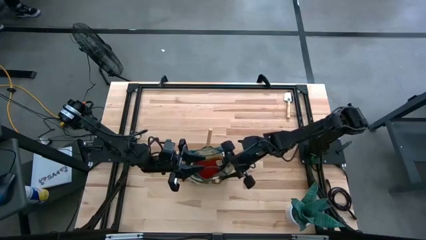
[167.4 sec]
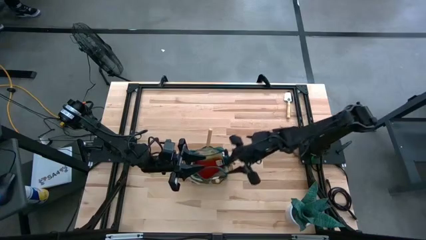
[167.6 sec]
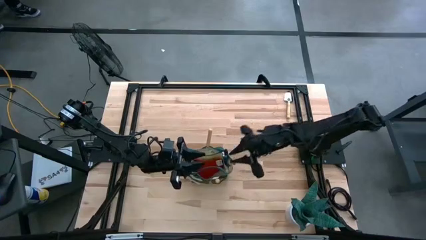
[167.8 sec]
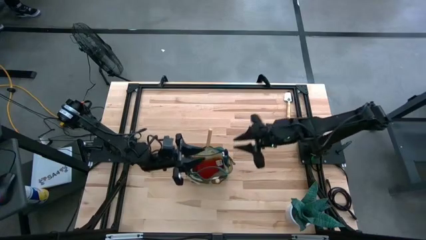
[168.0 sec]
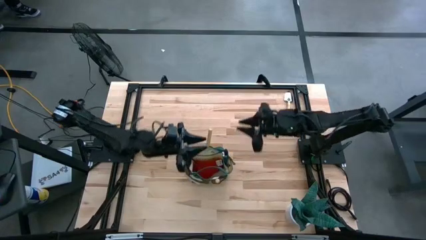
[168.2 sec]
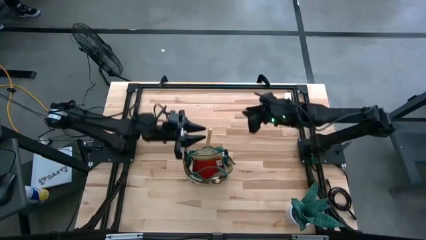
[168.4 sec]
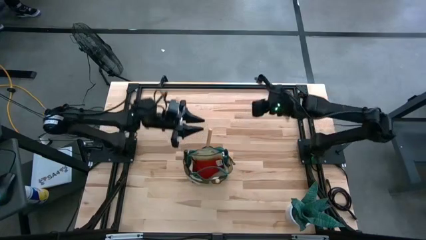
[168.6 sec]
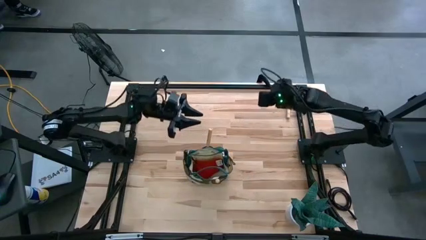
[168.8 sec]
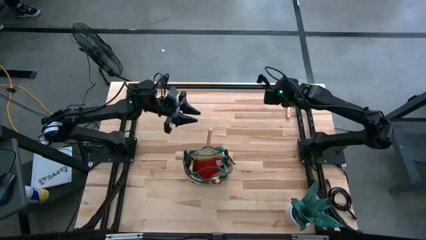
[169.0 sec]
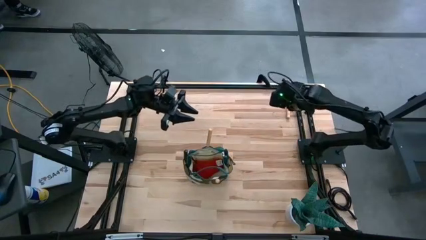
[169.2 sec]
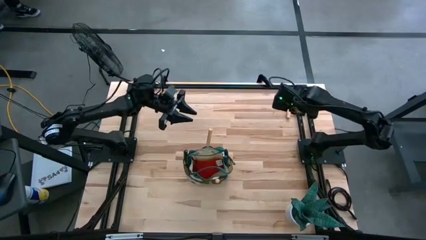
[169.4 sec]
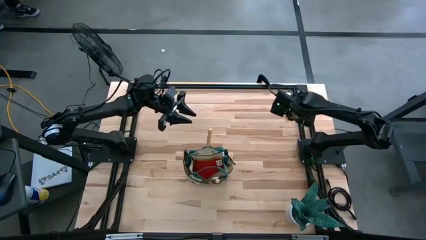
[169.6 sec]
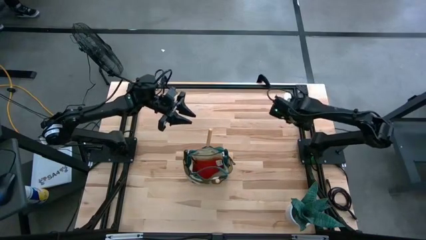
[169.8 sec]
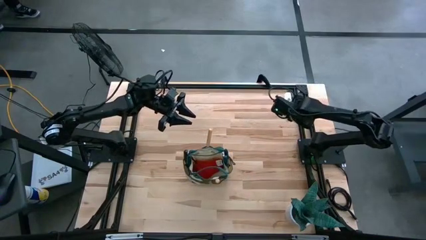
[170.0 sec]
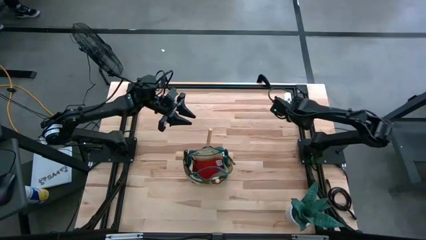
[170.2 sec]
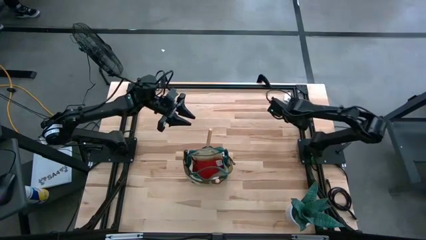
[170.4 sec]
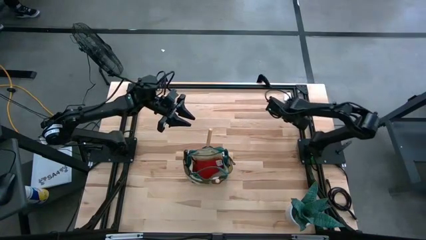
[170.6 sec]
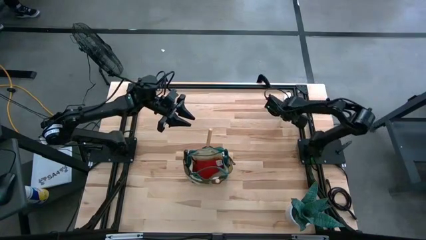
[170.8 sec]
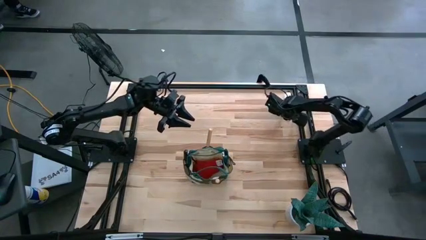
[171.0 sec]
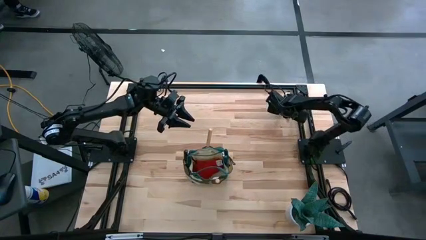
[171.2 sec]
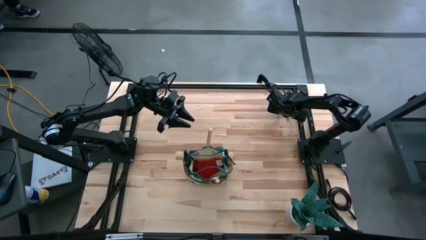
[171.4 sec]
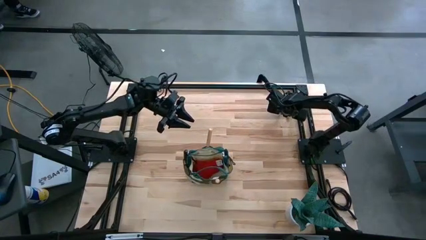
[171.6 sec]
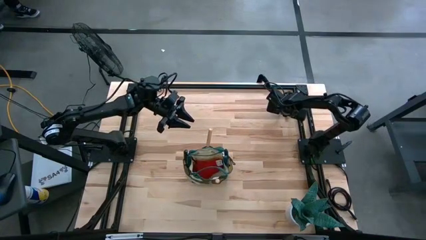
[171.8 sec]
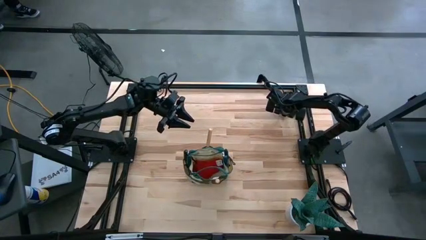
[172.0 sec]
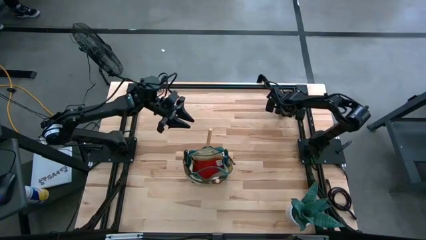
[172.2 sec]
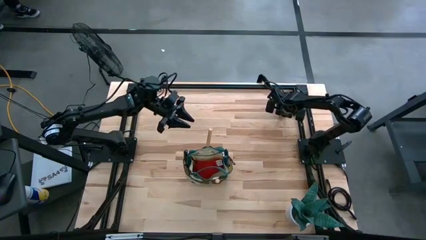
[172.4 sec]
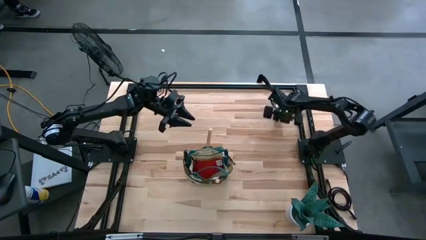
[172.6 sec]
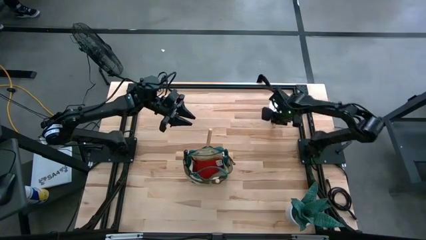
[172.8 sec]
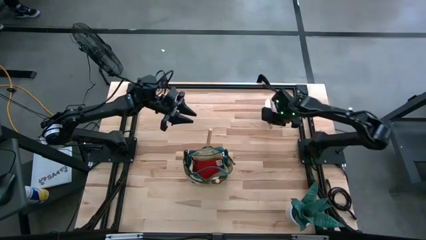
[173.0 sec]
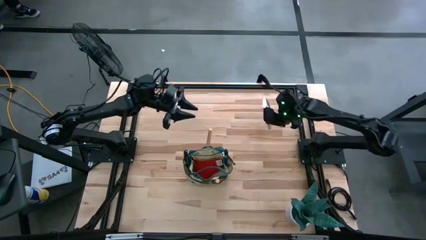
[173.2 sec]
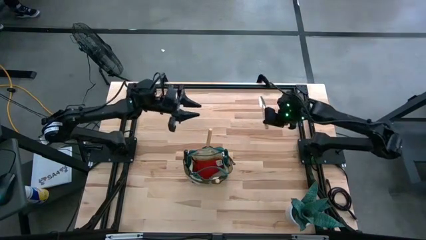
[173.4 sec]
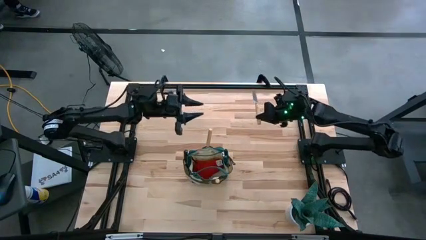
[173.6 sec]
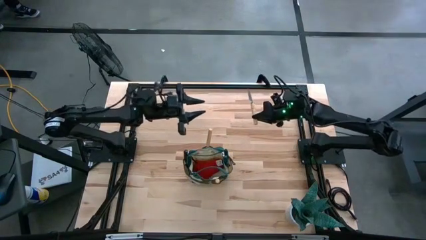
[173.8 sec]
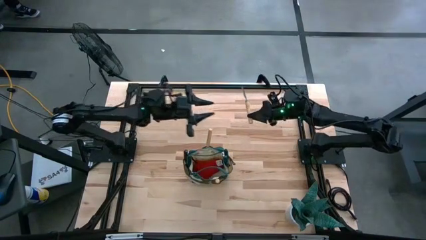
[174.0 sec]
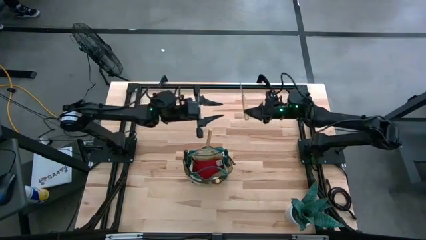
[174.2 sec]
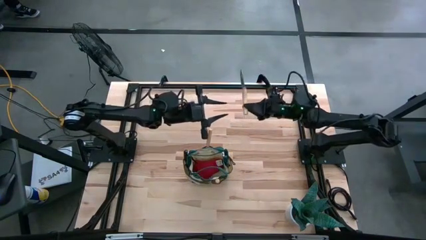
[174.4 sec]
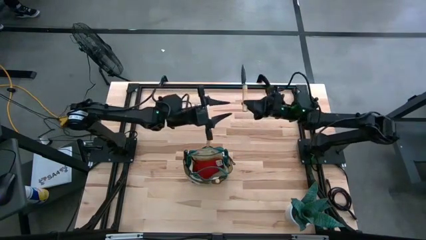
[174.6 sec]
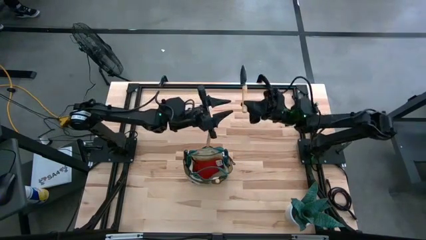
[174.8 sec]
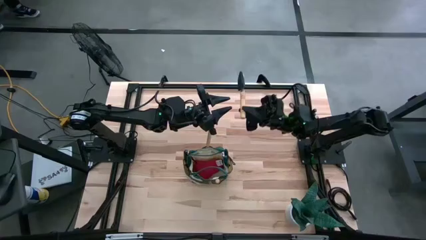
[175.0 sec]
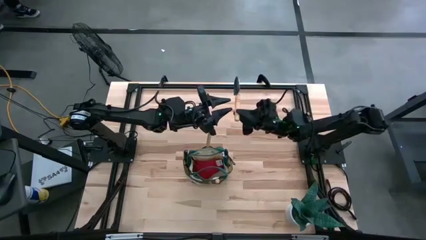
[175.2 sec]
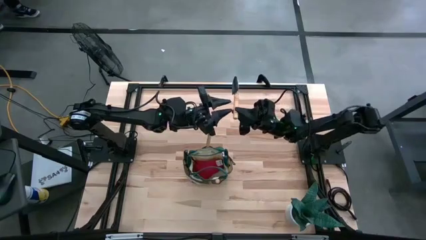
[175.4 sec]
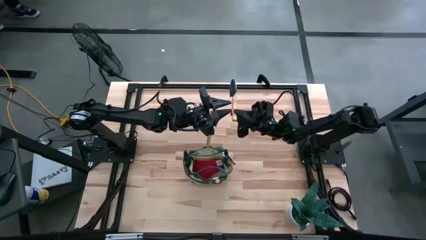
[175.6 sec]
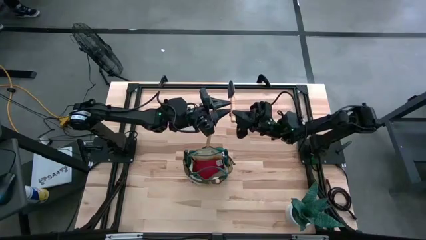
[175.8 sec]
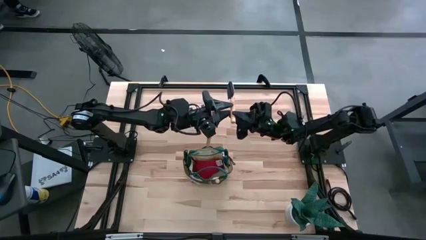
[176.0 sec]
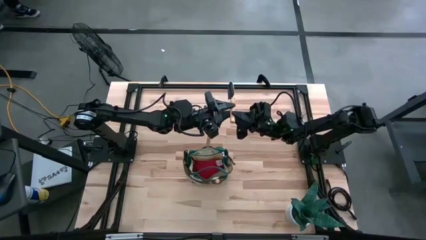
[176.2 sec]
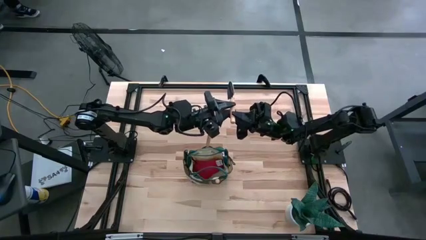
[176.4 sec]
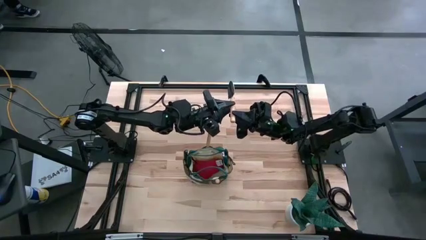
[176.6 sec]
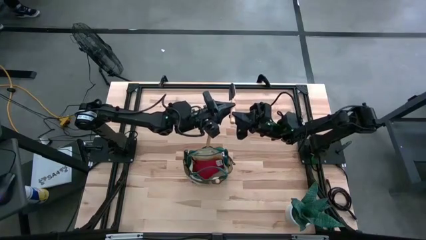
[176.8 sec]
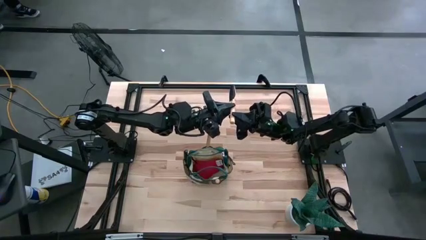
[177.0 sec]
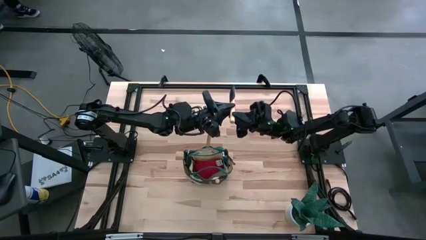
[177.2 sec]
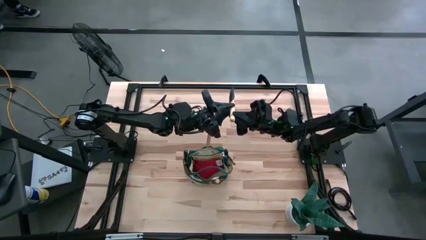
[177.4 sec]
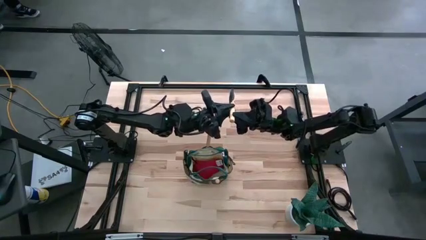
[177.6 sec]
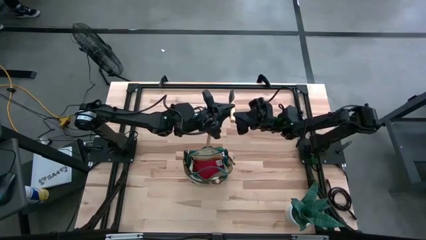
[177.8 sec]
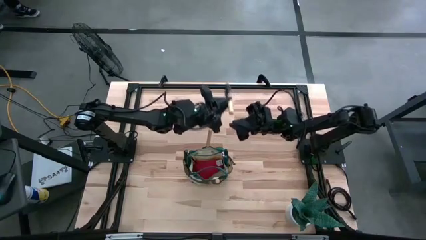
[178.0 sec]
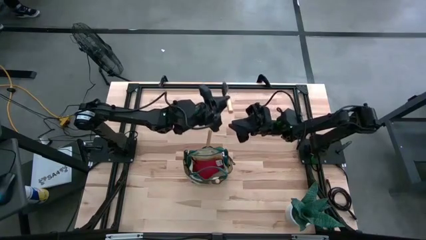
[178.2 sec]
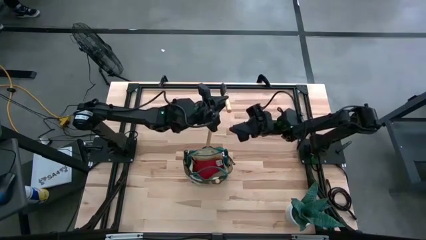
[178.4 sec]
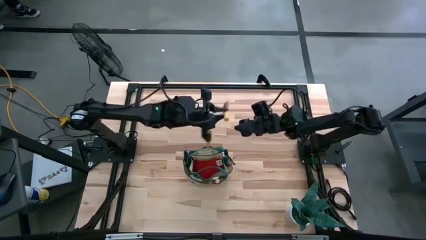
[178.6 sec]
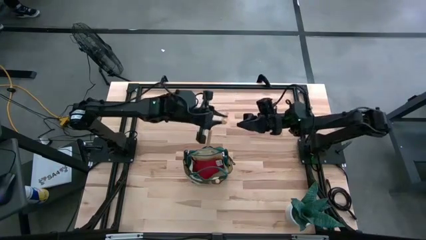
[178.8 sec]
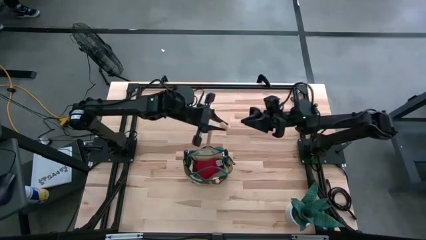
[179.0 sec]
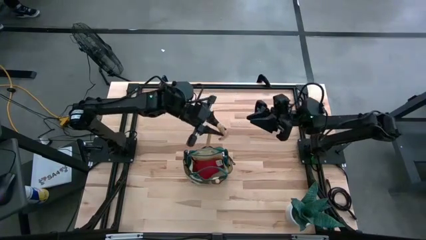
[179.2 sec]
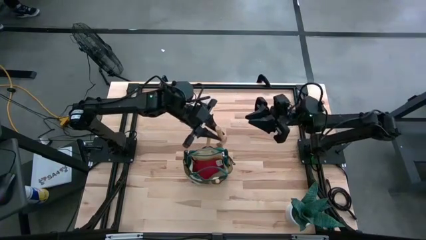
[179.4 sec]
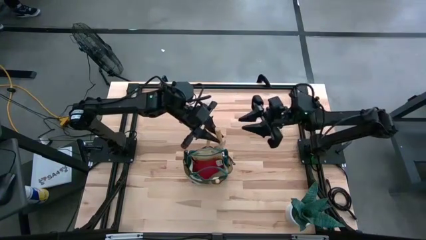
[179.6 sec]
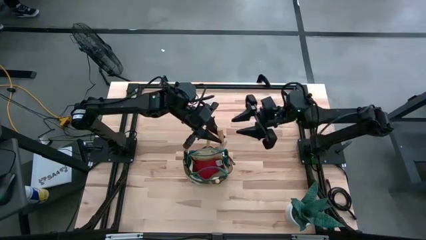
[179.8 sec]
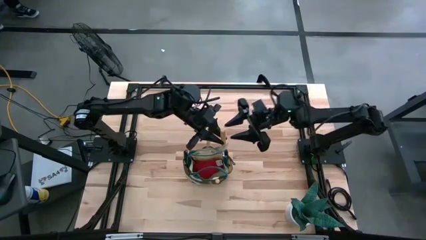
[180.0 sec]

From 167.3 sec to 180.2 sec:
Task: Pick & Place Garden tools in Gardening bag
Put the light brown trowel into the white gardening bag
